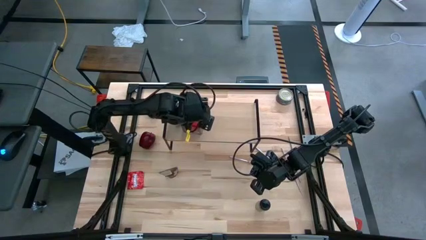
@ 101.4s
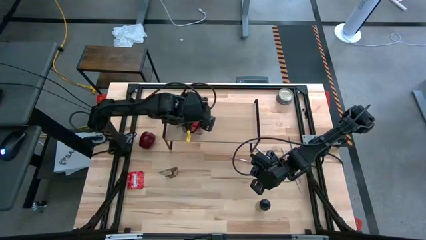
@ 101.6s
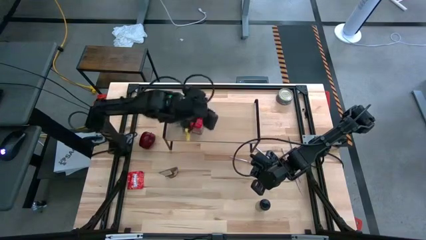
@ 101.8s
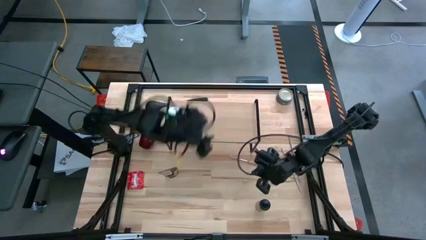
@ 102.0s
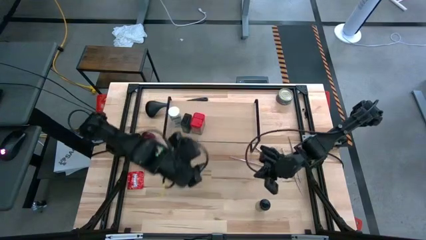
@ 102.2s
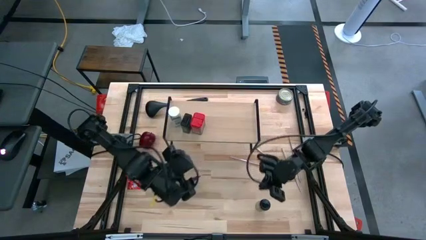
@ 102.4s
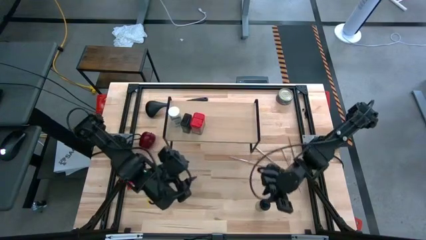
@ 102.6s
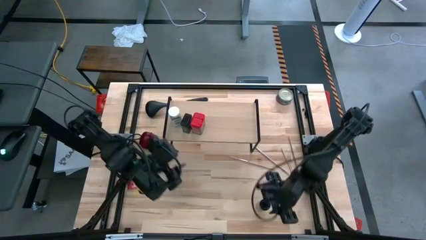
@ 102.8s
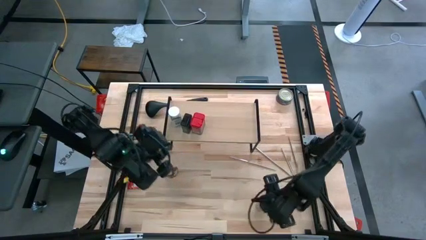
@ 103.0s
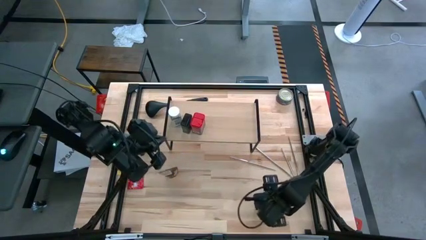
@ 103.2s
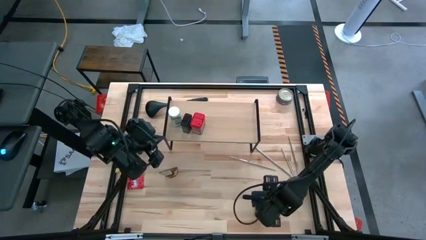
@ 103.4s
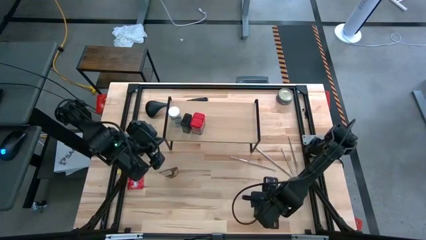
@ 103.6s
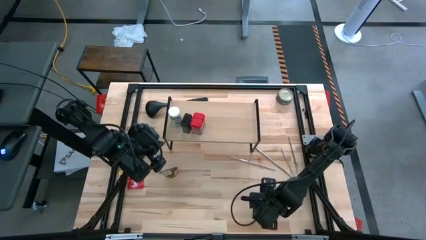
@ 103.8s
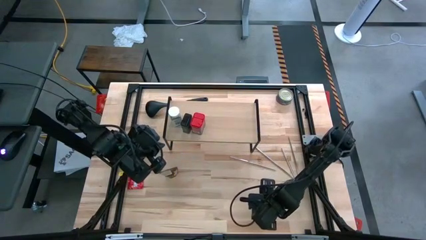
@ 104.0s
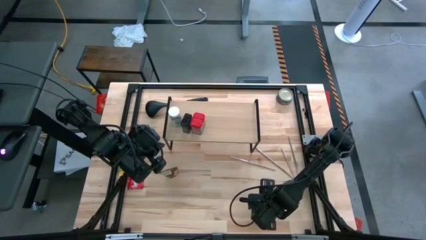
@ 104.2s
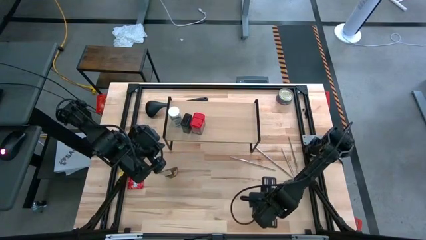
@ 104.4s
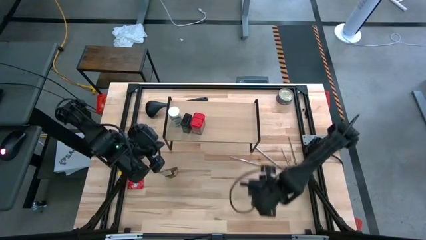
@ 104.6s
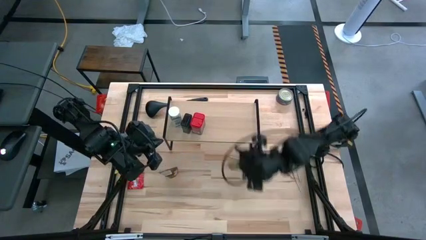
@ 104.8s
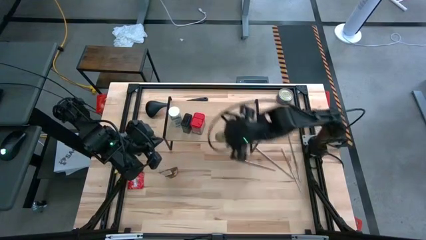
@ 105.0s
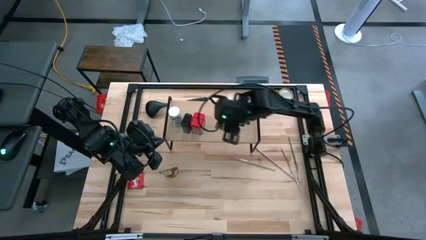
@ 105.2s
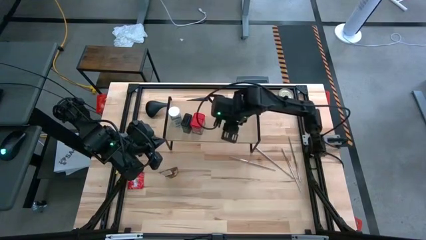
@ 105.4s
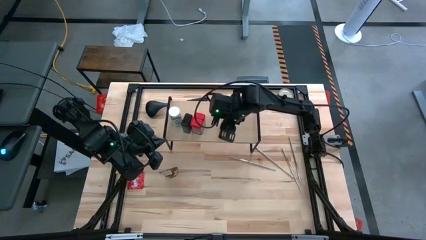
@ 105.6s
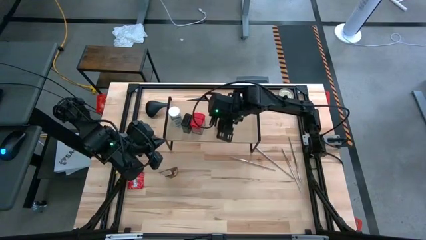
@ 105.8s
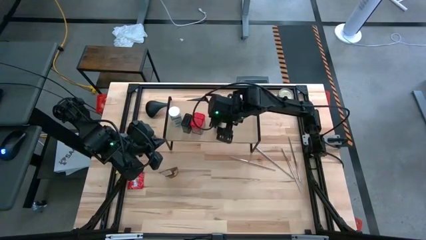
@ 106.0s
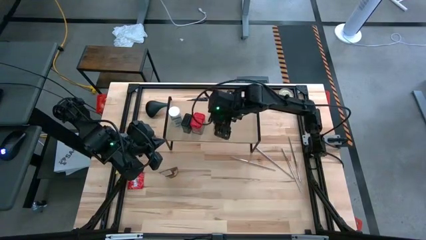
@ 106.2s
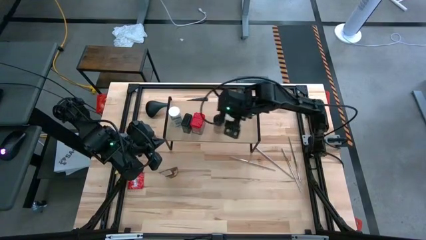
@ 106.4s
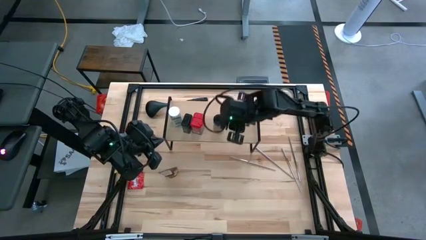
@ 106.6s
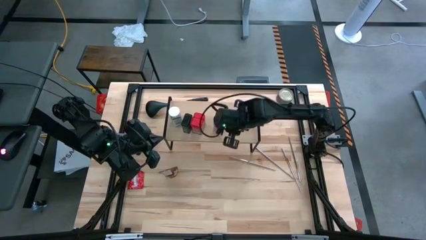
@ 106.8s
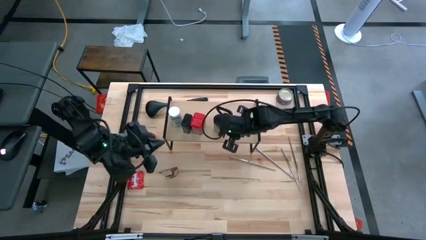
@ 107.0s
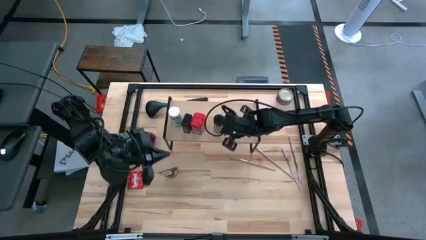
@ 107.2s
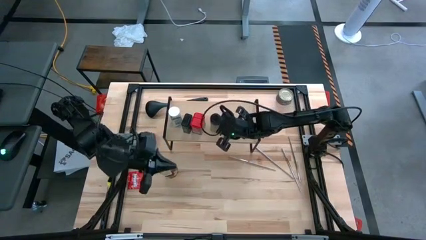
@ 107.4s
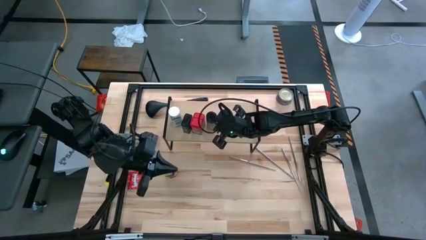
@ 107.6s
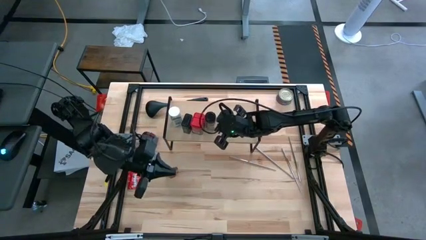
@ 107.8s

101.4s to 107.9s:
Task: Shelf spices
Put the yellow seasoning bottle on the shelf

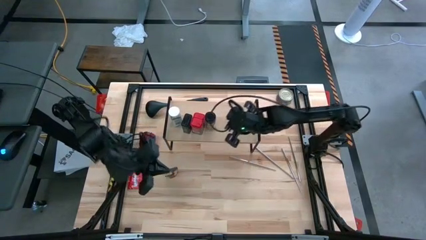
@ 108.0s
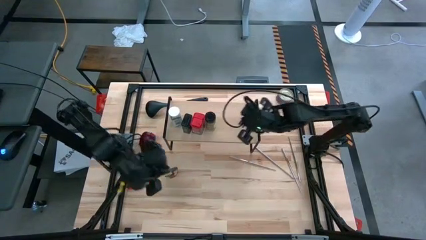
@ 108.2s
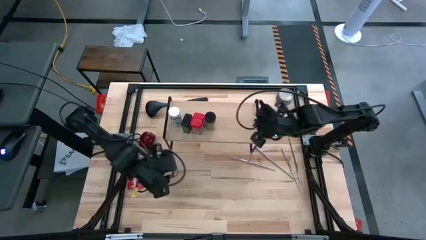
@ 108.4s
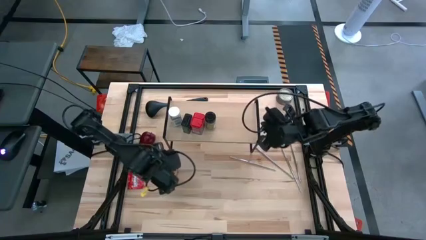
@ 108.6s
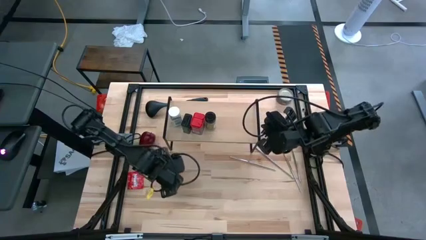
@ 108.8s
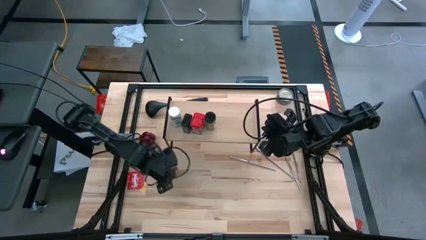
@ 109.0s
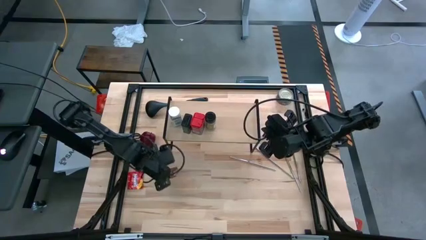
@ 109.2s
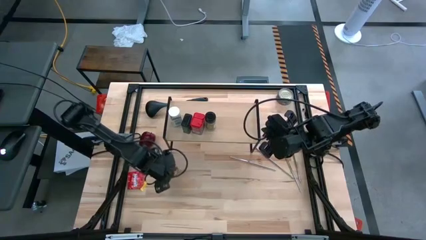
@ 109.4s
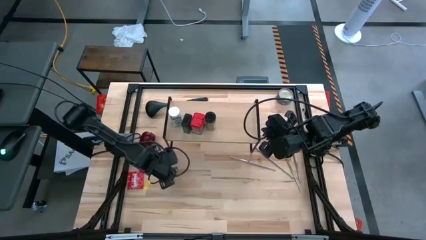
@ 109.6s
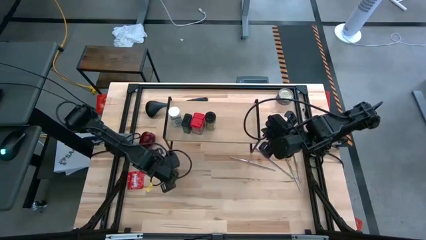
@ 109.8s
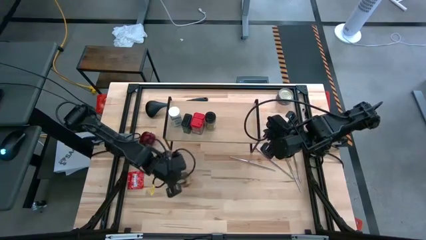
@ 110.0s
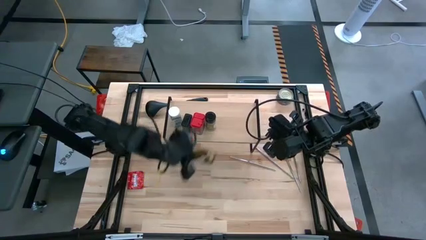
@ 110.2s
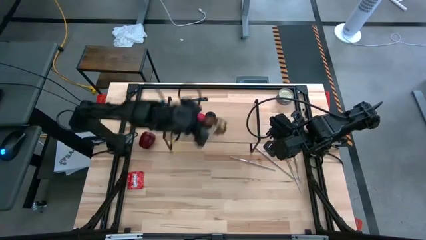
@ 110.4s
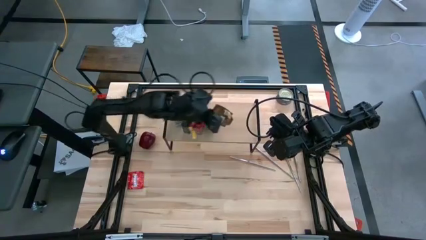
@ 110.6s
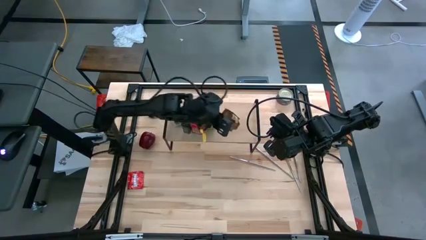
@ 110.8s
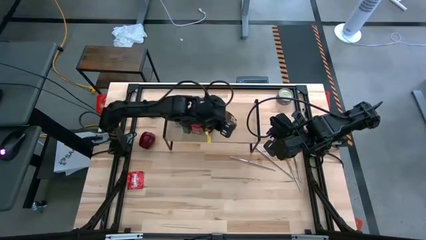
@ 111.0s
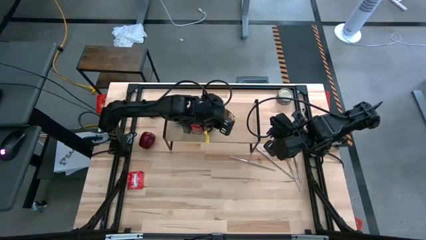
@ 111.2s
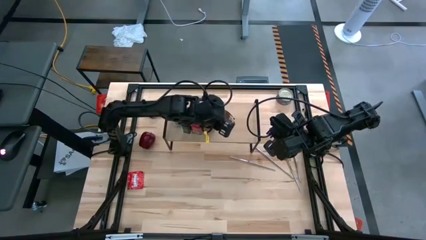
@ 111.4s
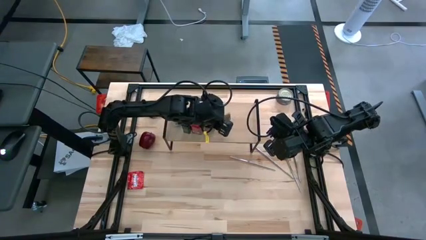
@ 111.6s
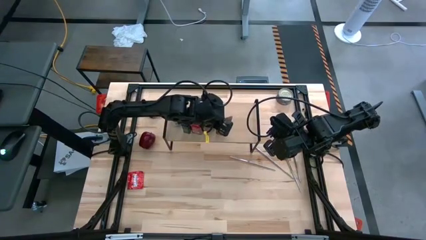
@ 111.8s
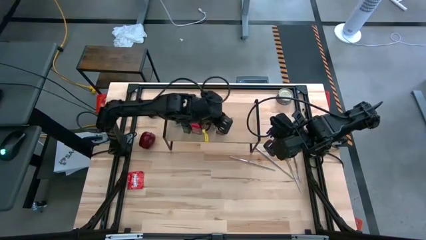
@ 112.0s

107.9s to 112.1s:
Put the brown seasoning bottle on the shelf

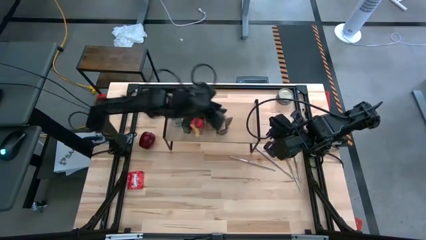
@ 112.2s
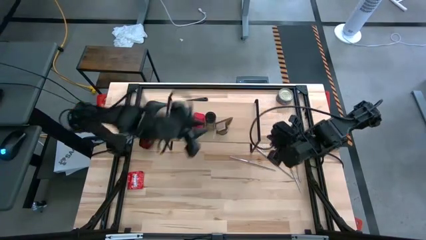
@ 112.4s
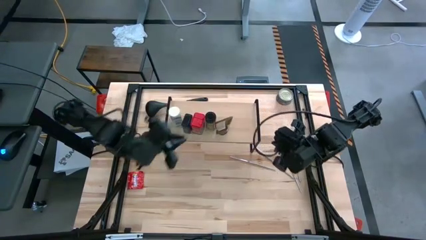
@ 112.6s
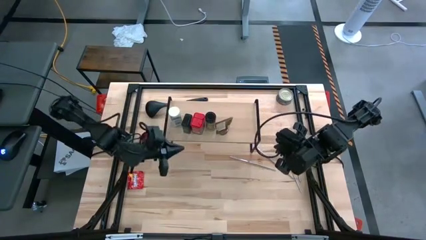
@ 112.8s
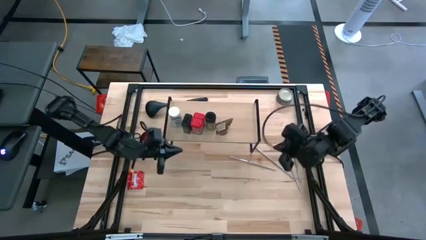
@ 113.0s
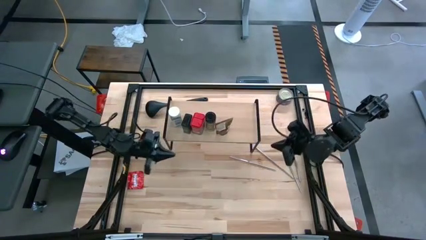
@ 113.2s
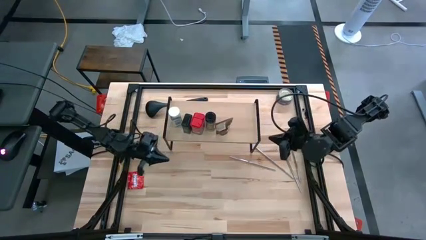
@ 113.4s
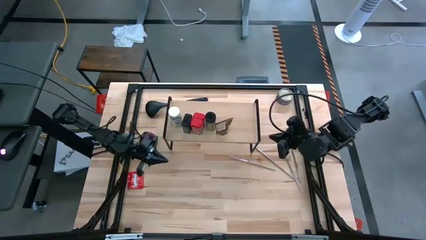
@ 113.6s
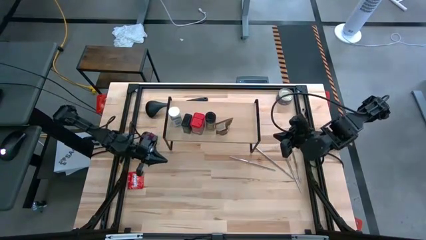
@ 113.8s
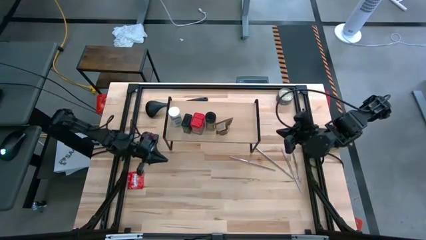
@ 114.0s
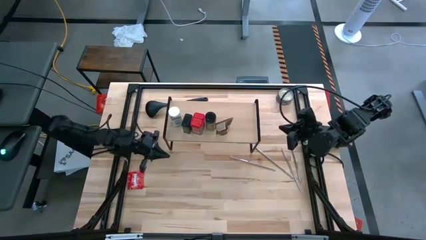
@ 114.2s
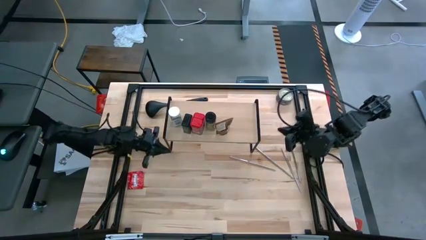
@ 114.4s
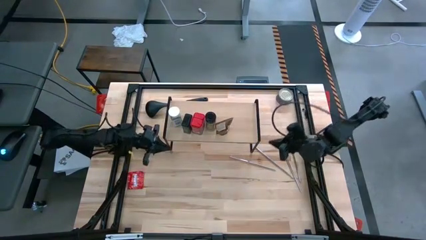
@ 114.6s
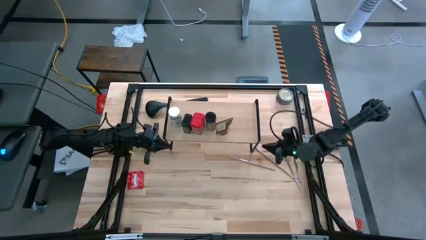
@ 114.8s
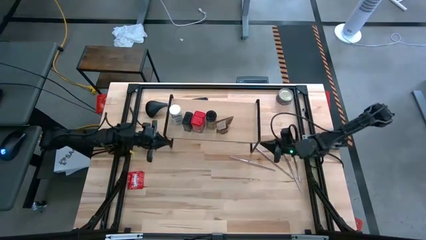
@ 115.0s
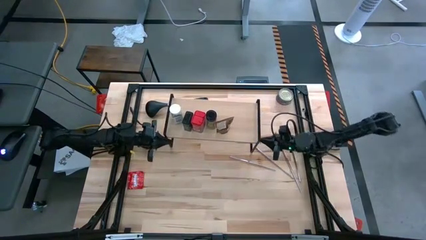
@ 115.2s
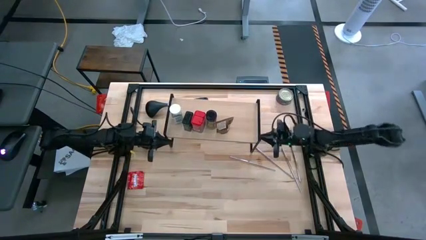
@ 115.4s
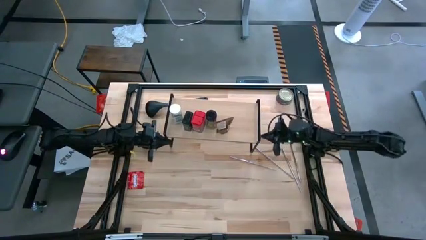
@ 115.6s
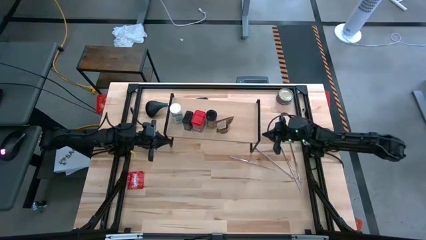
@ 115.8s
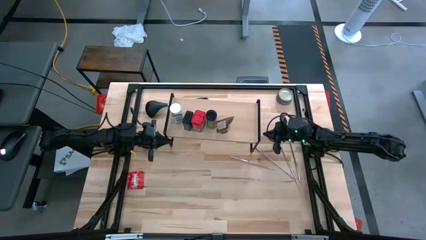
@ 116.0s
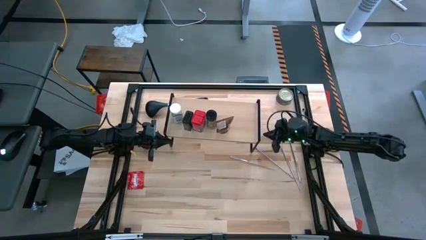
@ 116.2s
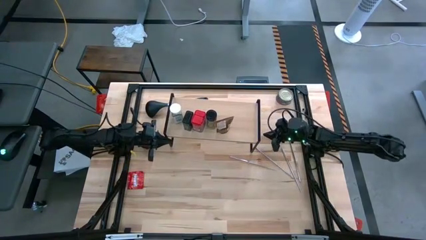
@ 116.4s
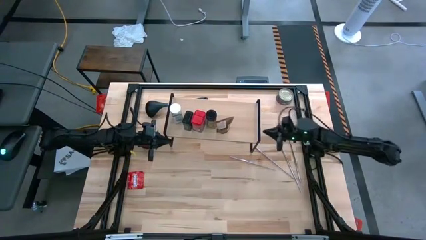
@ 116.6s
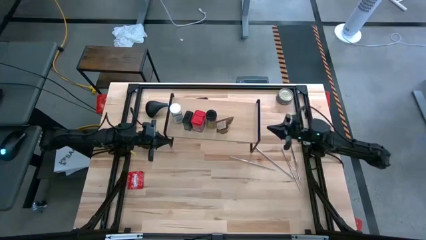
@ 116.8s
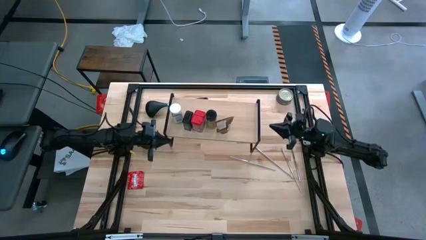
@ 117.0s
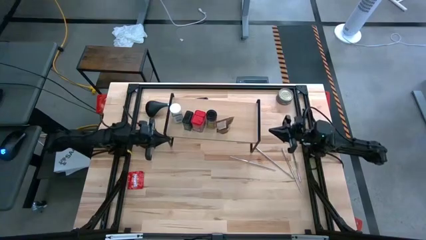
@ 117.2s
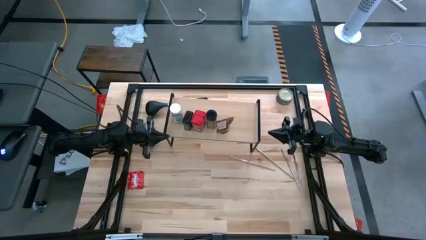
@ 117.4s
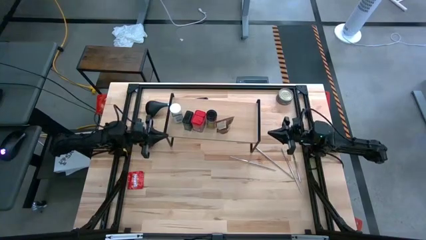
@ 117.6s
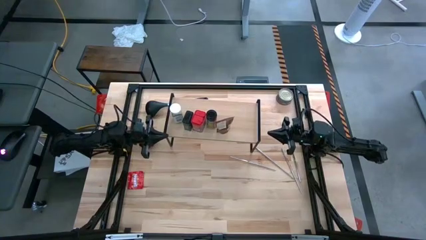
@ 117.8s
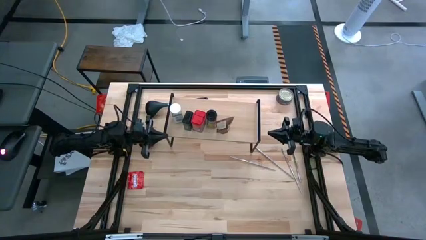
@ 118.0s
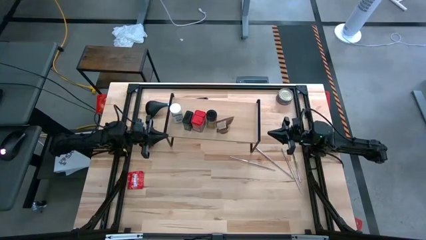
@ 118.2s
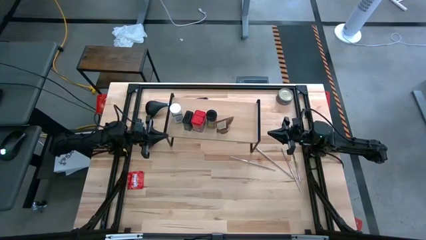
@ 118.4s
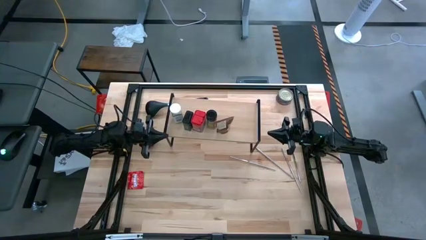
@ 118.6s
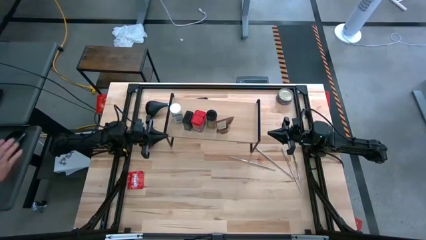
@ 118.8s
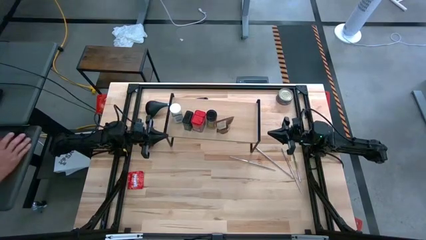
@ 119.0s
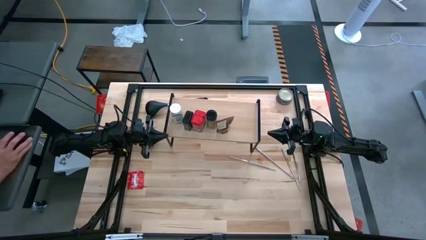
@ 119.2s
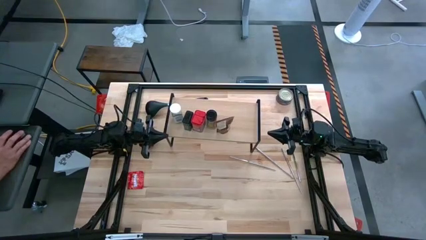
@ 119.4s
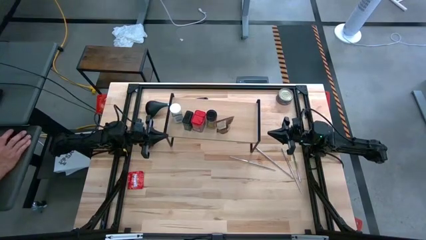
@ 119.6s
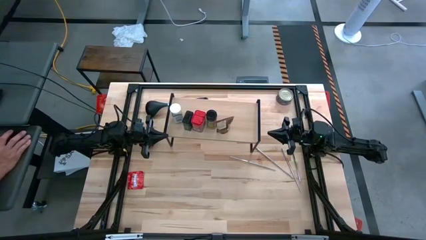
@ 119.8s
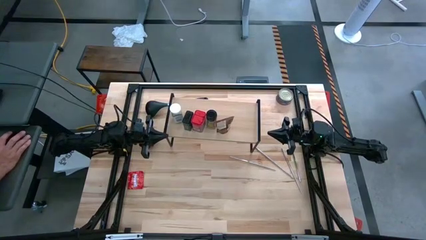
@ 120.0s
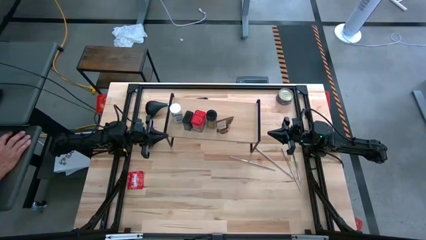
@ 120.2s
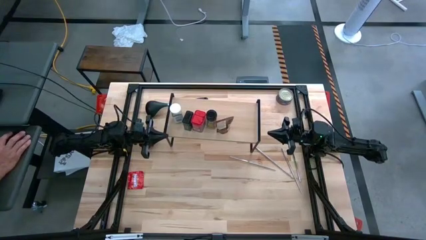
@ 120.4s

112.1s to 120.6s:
Return to Home Position
